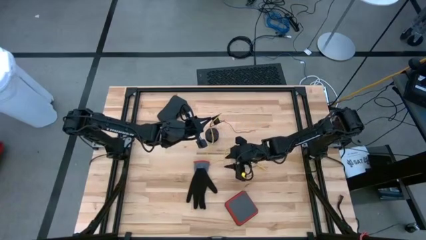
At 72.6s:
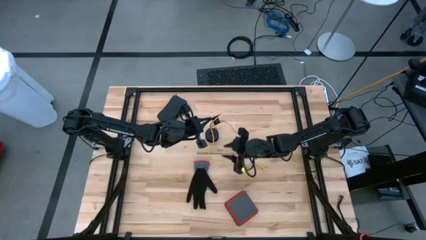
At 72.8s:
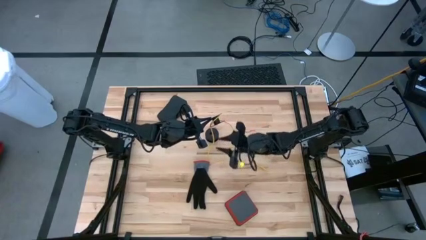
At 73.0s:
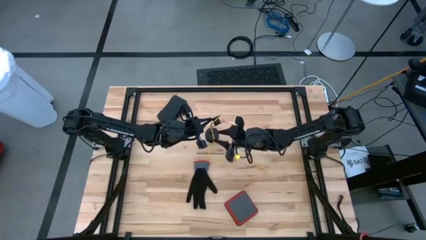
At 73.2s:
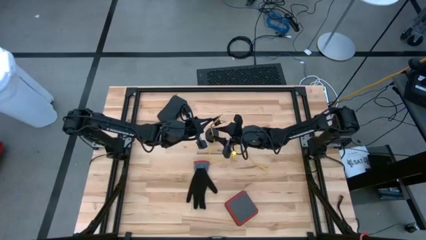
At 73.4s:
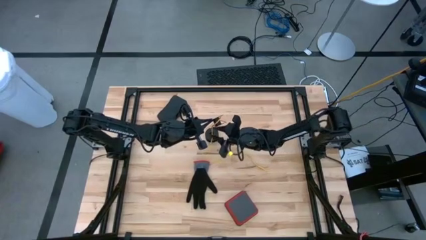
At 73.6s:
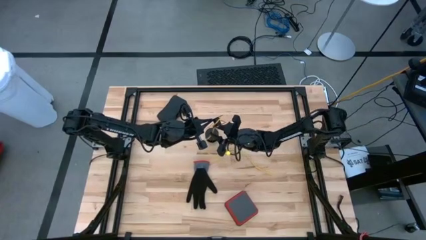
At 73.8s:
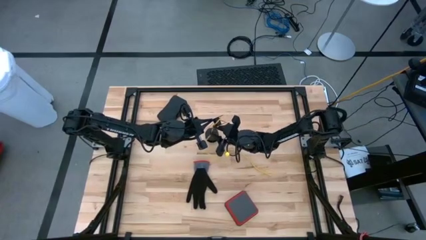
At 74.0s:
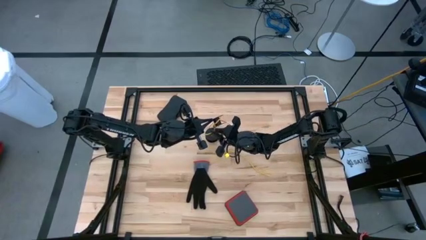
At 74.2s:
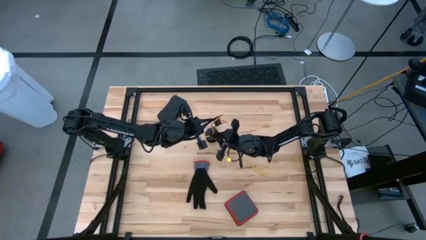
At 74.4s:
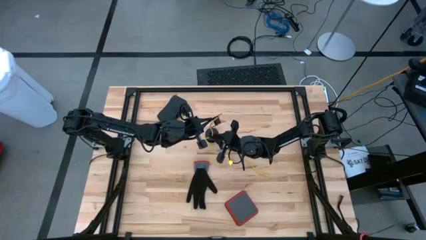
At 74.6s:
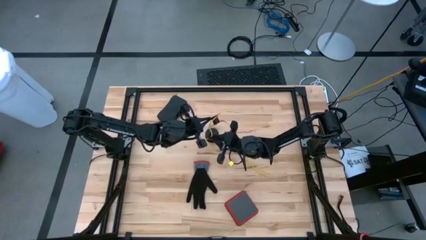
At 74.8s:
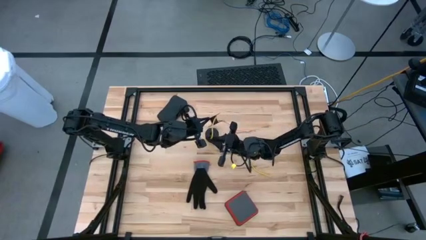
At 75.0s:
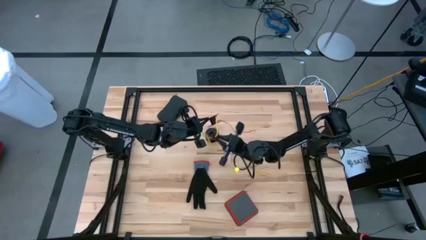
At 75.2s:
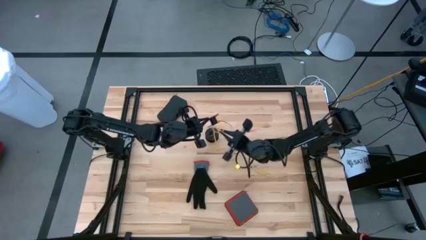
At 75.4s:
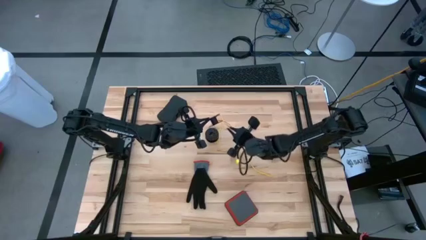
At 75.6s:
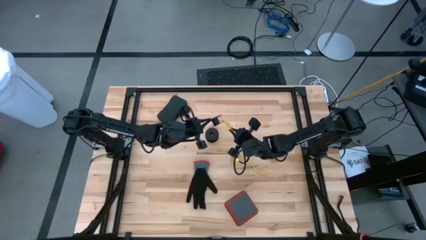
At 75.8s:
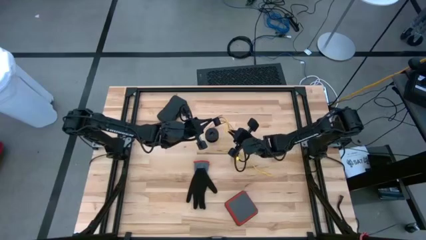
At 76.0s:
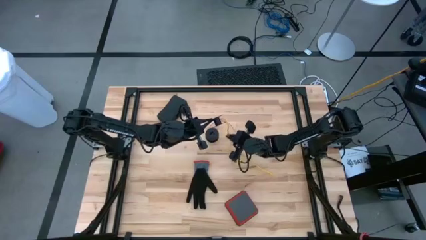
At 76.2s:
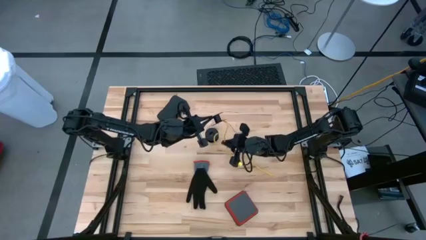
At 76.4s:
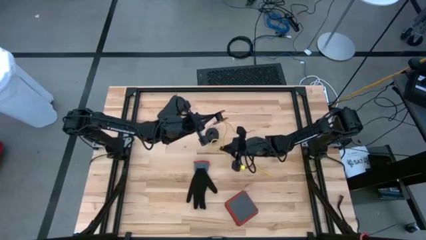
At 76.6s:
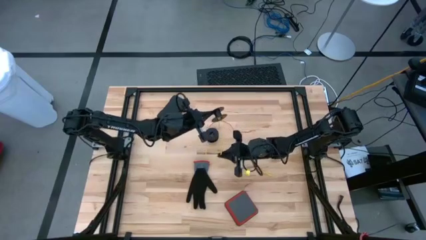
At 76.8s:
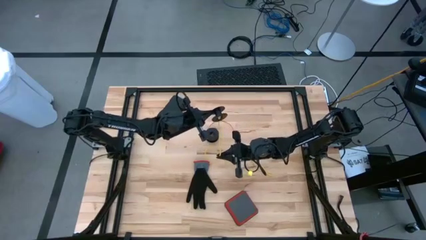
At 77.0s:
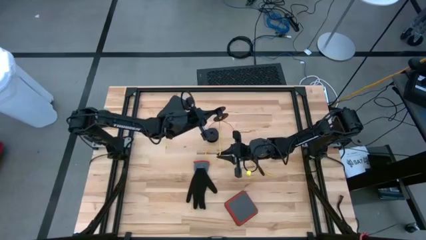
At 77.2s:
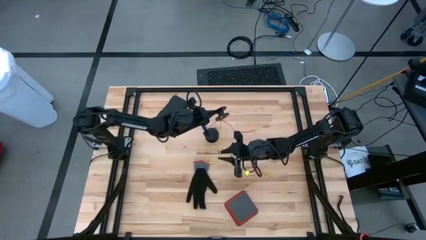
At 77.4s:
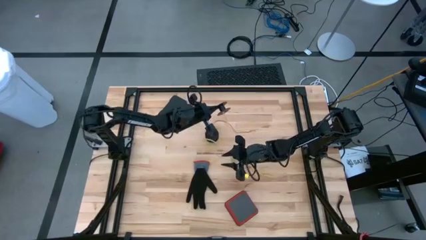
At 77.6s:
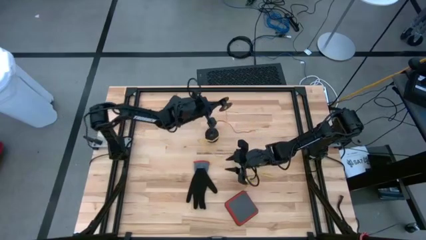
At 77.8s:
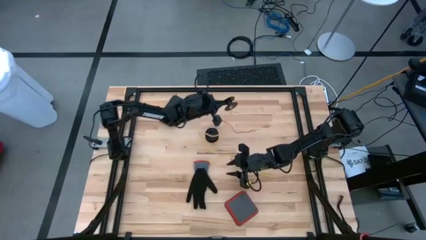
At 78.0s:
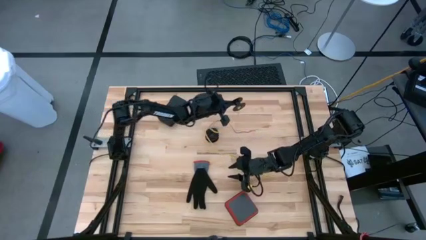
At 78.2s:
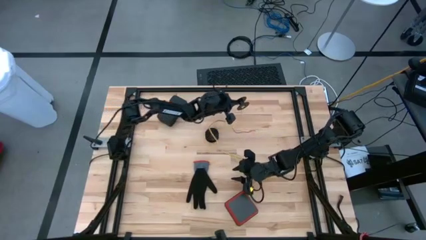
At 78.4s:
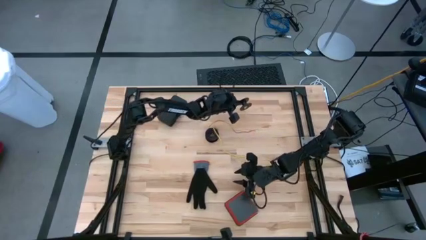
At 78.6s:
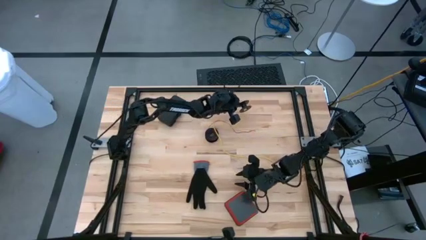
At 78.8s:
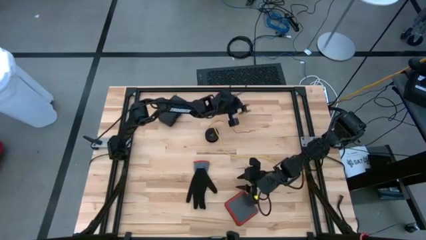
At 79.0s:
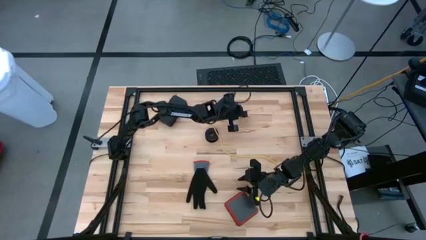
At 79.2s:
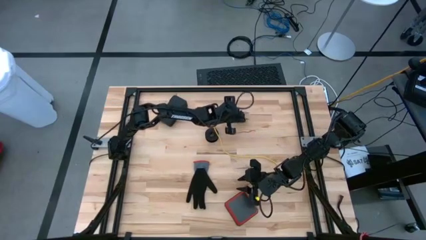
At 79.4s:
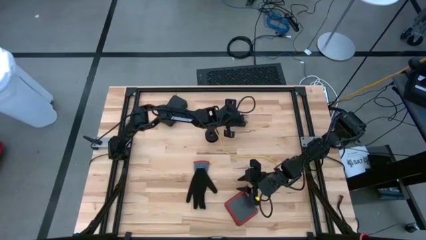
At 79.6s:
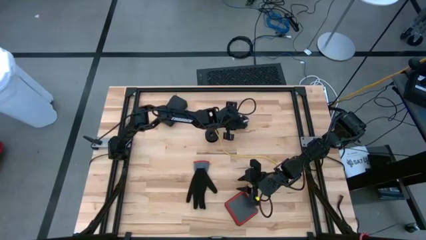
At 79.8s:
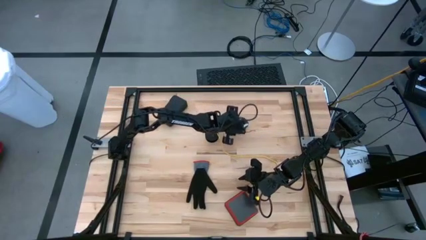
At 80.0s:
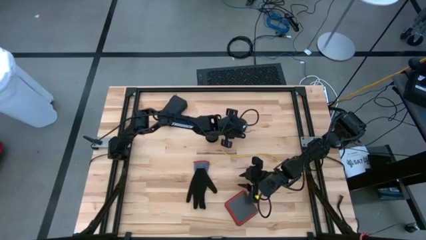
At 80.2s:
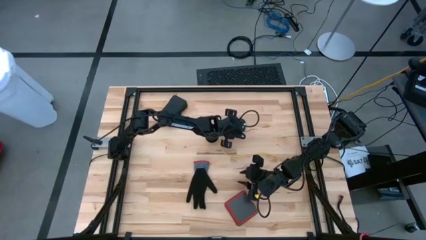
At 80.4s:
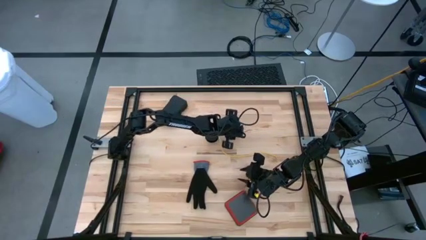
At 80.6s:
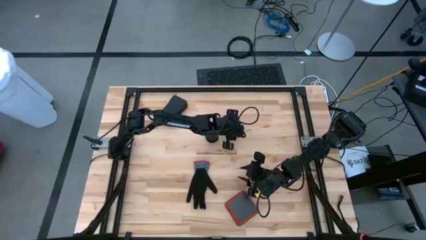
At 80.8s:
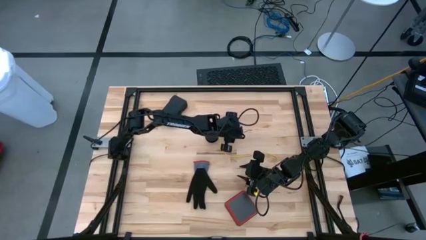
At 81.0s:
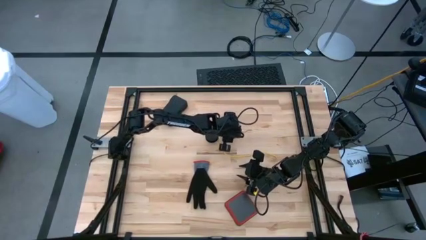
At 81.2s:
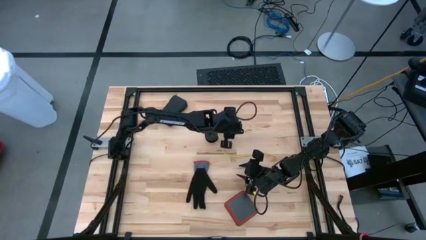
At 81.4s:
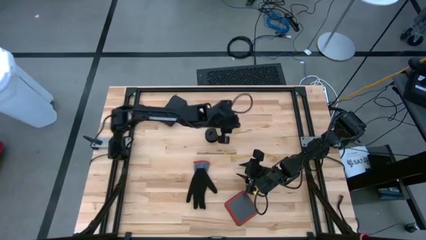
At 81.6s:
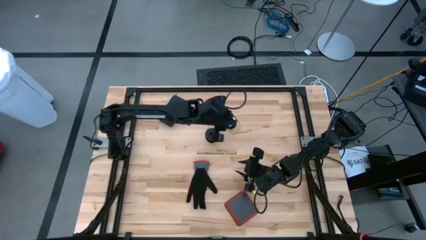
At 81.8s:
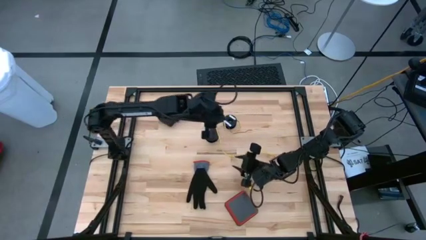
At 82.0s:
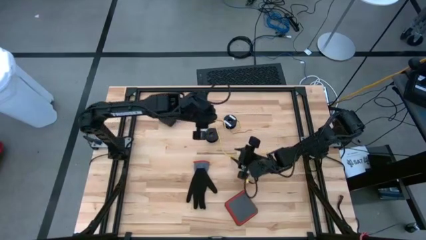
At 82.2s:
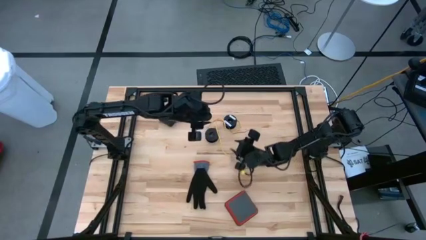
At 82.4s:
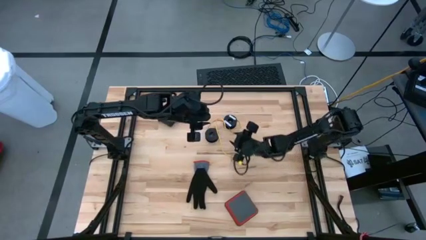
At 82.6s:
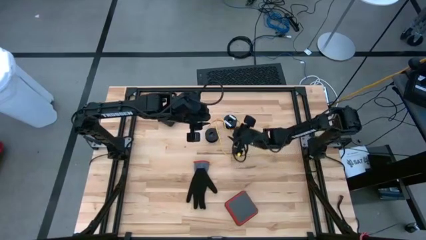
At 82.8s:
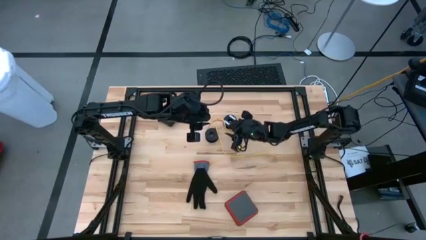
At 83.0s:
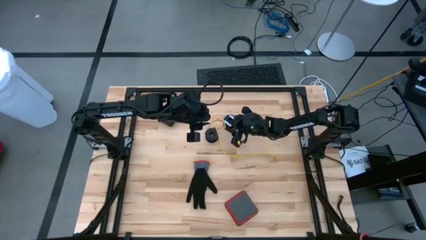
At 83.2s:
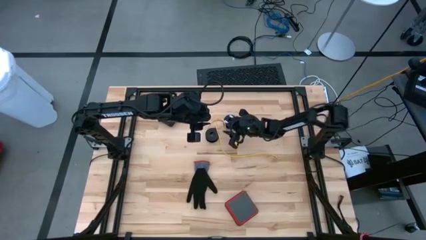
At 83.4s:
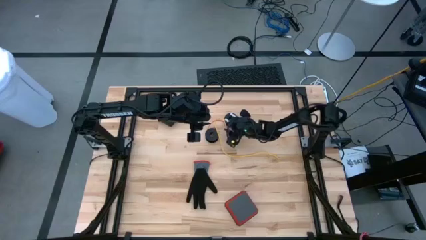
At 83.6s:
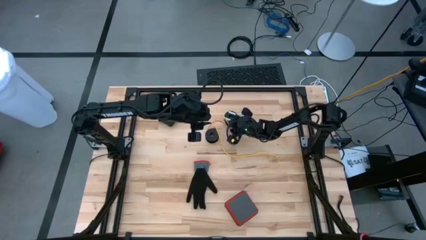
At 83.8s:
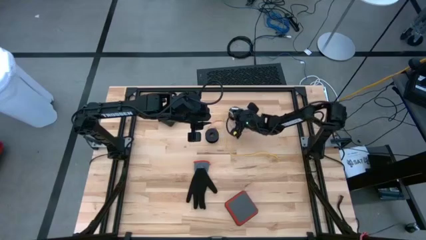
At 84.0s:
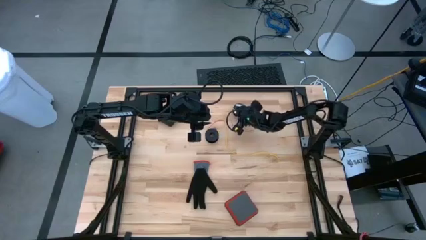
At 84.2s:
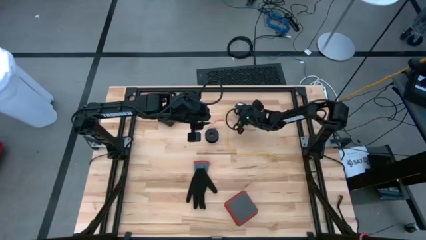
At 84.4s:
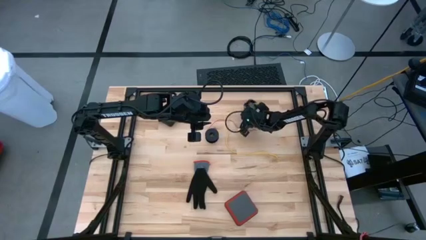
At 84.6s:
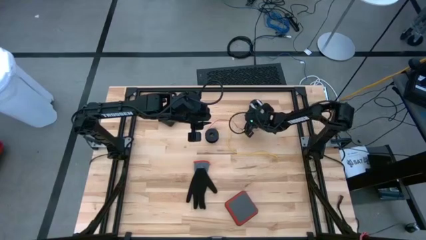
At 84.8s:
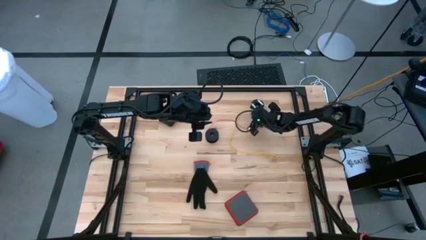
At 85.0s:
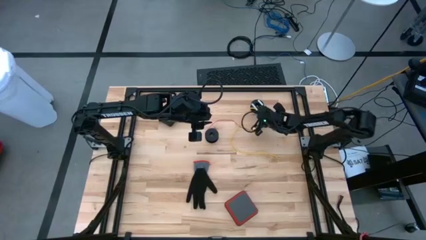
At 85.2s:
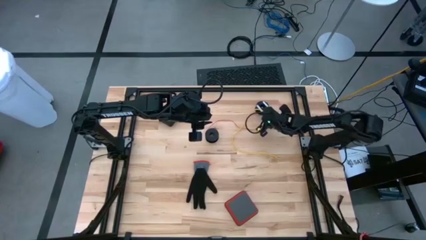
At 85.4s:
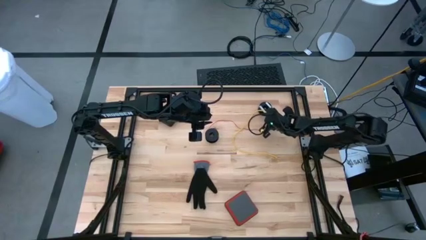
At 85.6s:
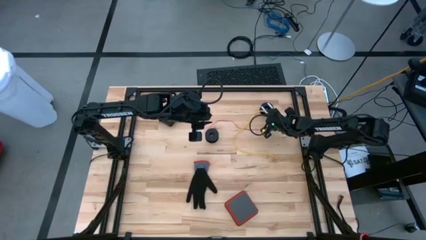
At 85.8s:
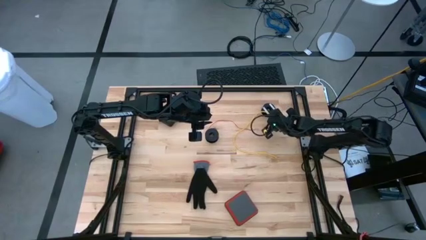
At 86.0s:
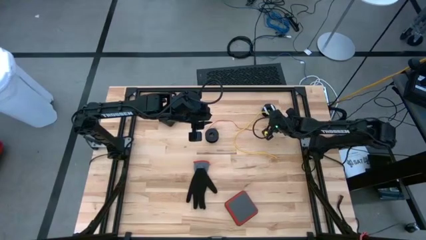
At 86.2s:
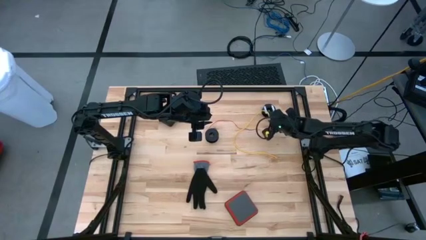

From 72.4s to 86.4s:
Task: Coil cords
Uncoil the yellow wire from the black spool

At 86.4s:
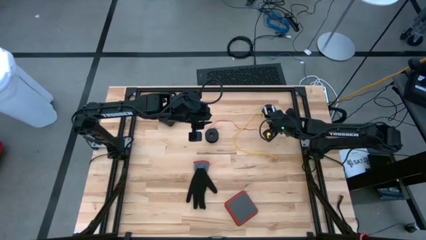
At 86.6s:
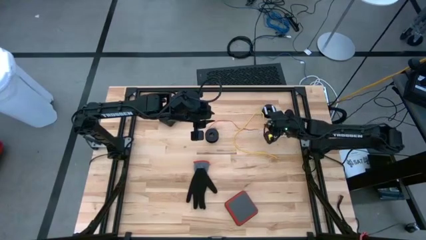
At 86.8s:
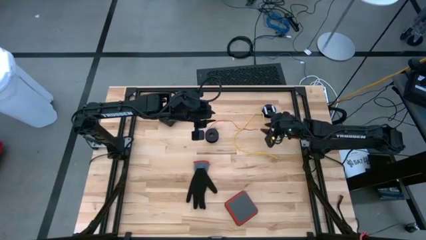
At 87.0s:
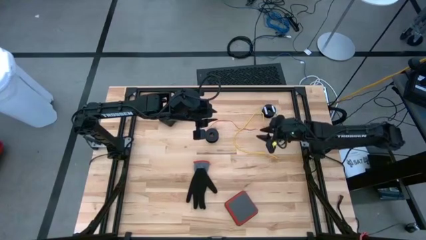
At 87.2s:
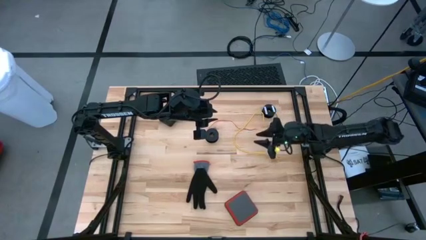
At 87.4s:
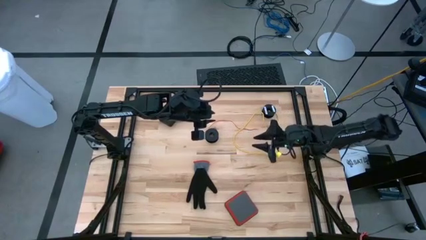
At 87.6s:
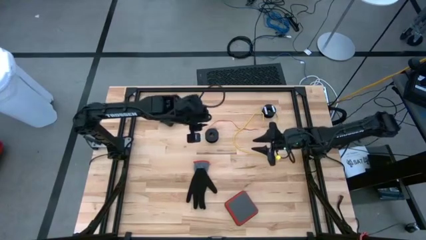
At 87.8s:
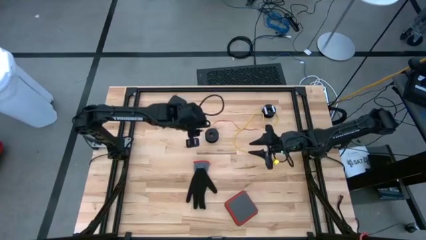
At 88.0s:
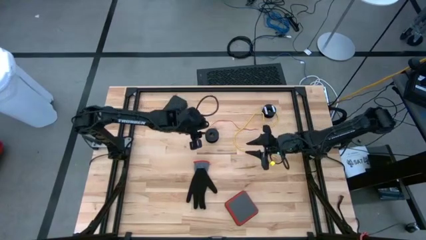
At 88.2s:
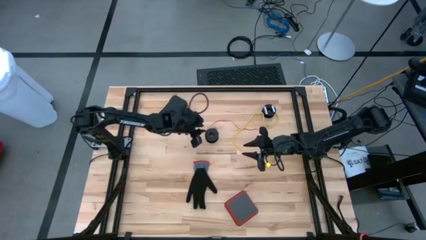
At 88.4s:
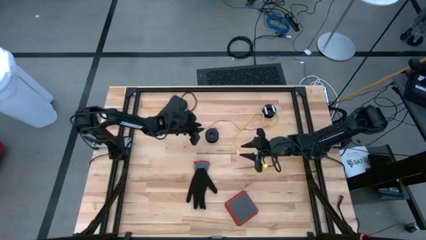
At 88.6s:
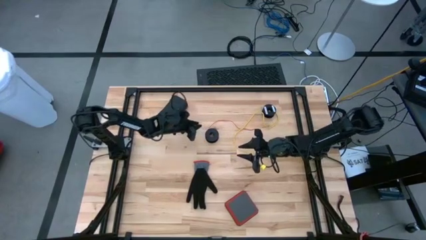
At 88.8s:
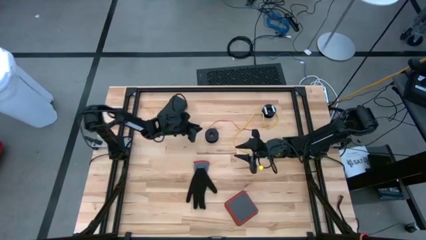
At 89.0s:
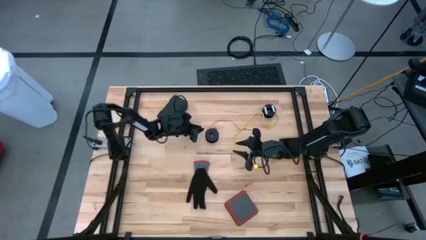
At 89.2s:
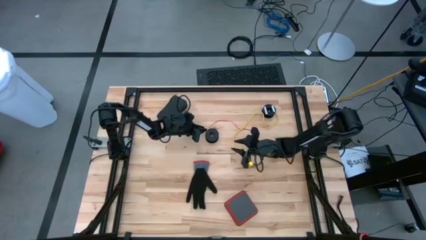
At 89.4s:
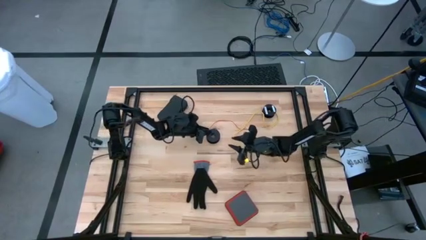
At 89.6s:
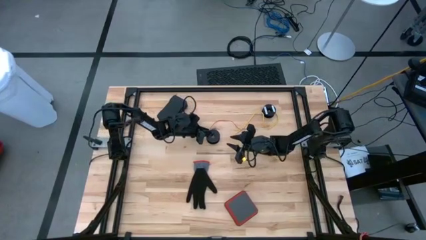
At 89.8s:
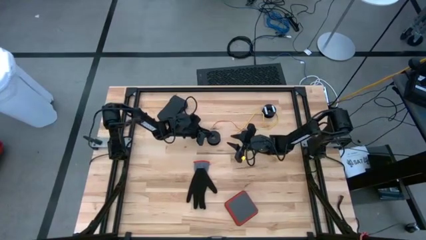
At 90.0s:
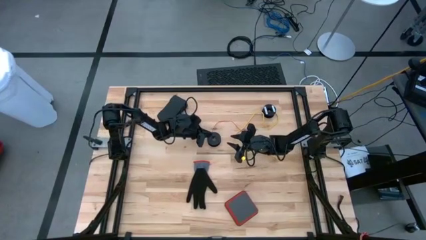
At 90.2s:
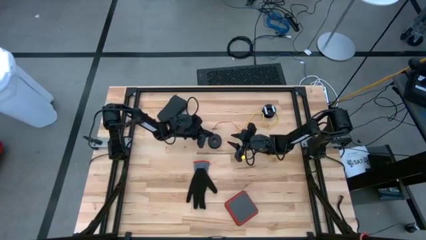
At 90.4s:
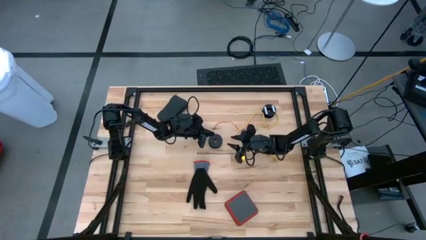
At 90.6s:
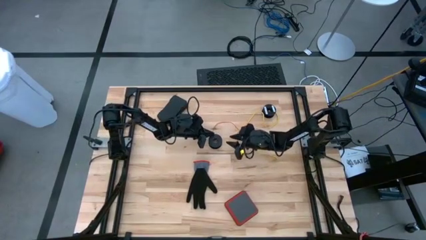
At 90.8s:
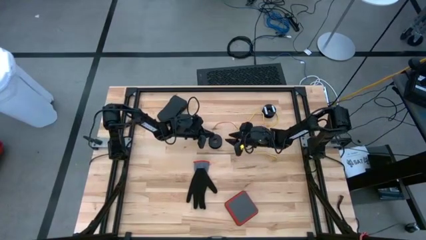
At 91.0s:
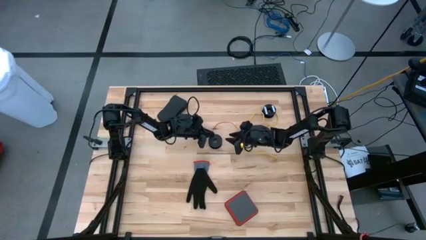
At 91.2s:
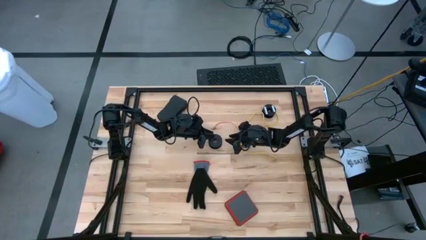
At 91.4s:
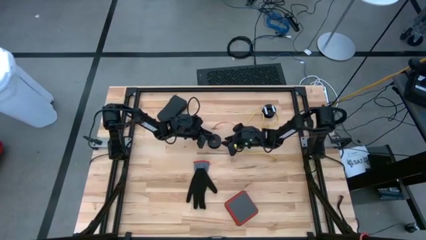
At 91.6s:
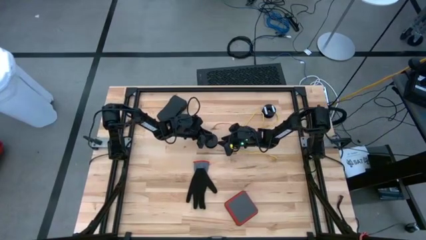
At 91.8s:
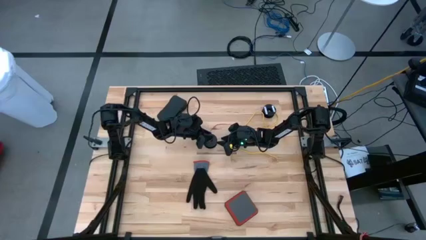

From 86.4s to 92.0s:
Uncoil the red wire from the black spool
